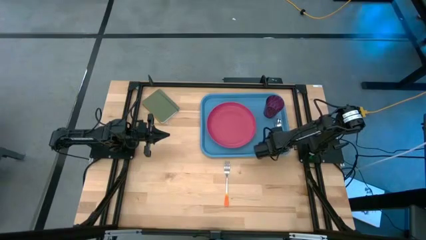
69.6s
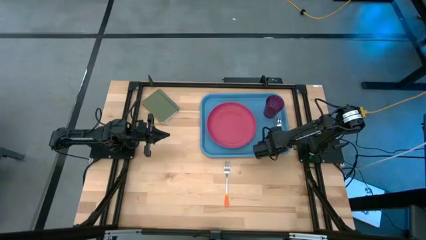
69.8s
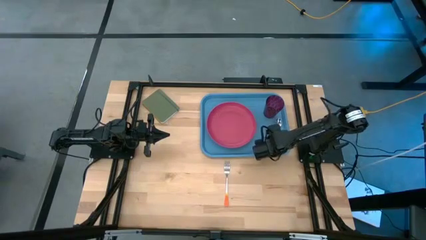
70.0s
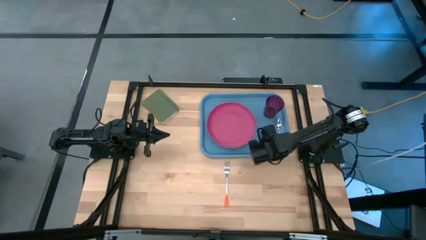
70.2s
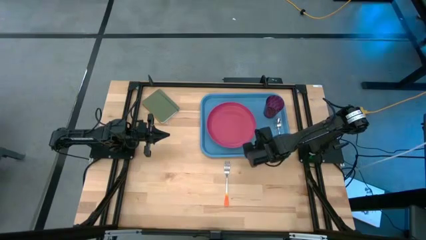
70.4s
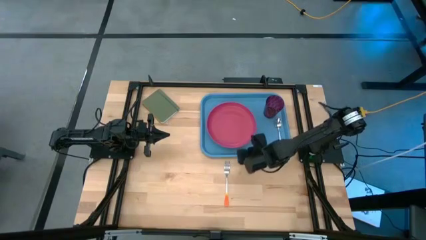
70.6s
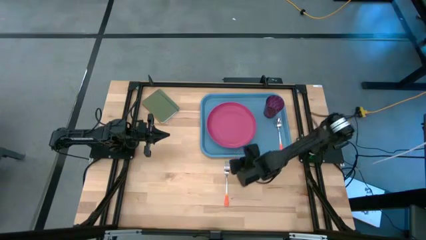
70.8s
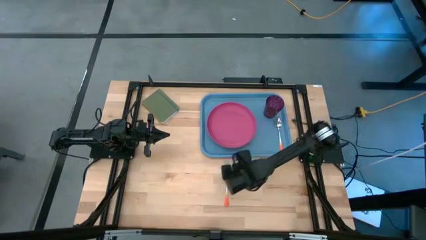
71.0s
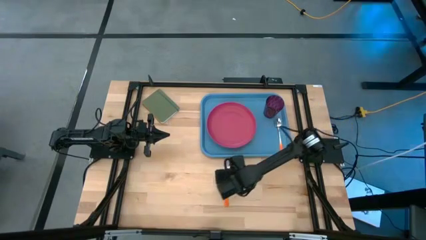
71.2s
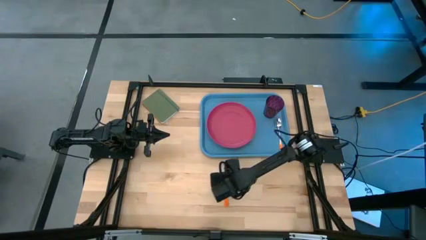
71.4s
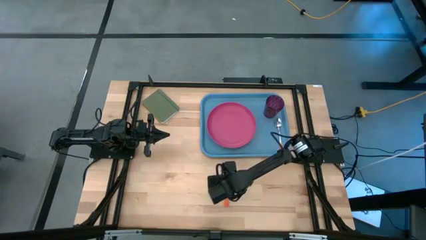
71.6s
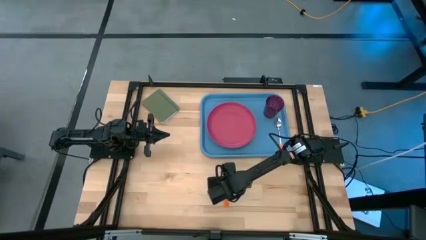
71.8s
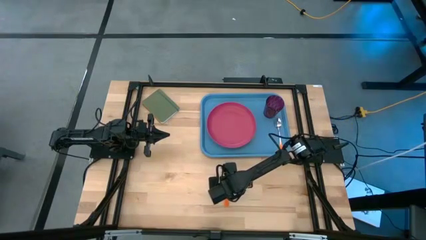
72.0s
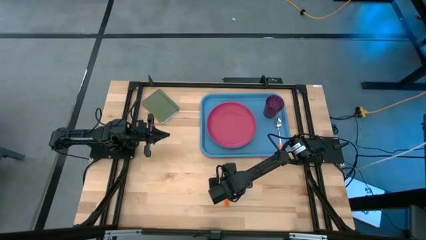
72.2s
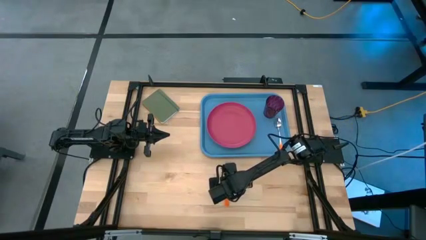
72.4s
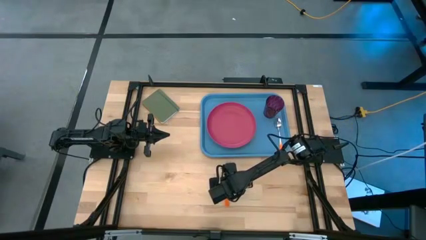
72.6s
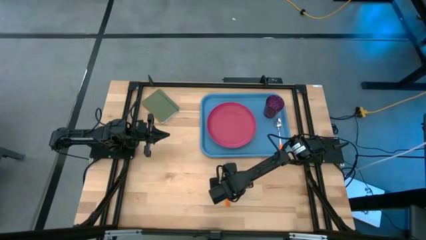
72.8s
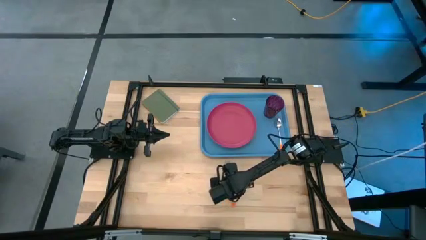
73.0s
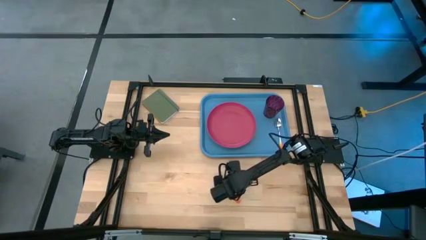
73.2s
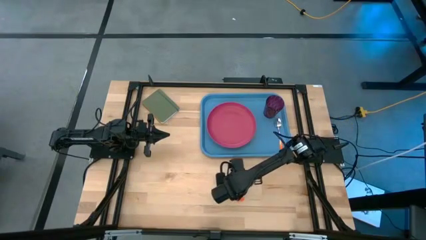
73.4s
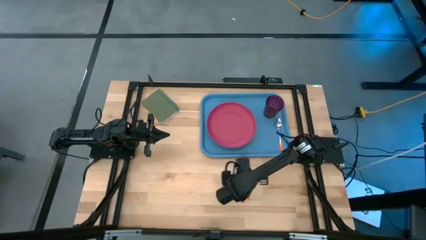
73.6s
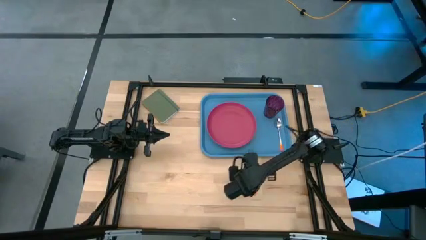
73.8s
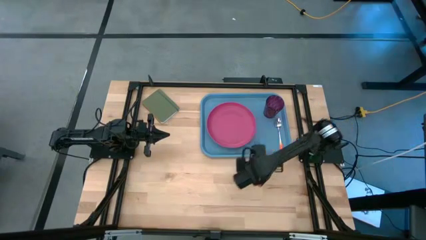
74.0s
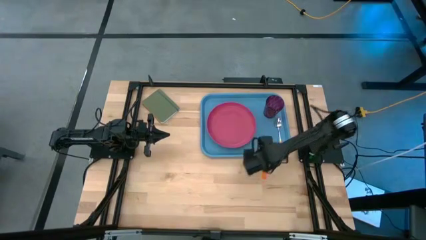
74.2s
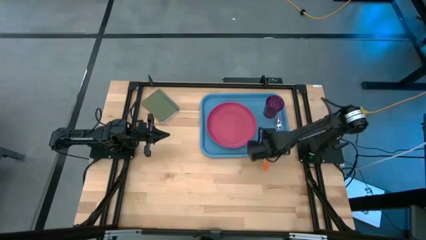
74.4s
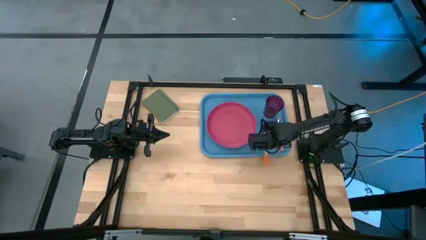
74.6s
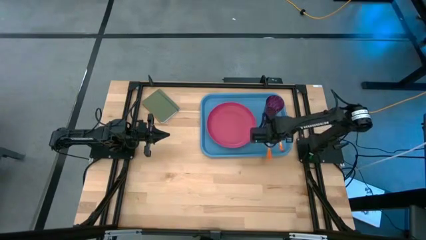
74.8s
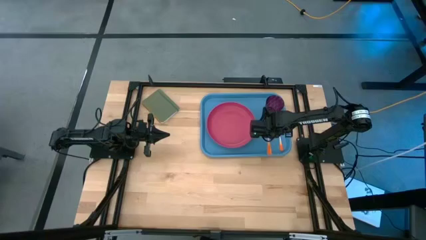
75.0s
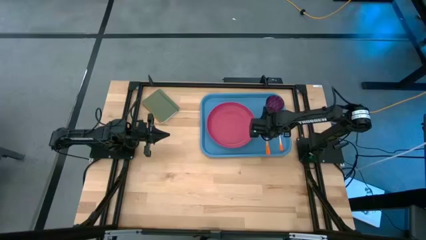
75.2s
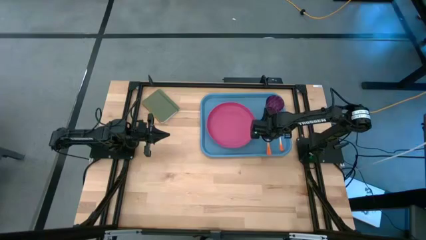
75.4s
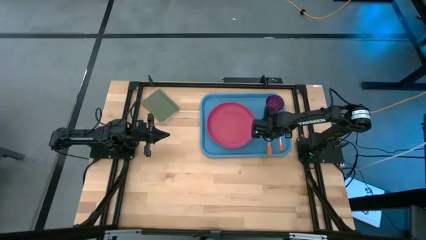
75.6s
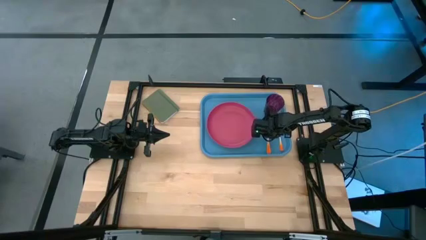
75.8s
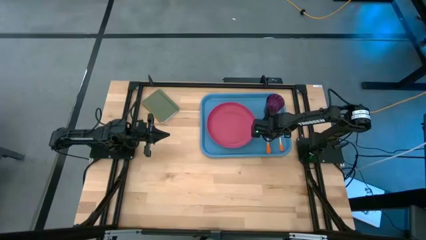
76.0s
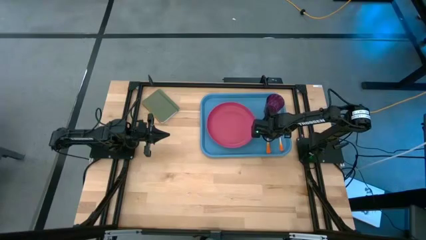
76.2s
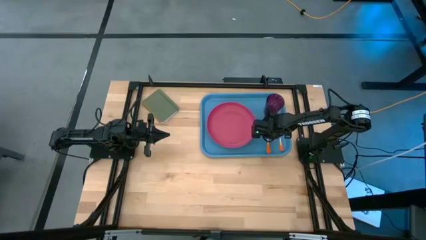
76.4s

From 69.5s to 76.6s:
Task: Pick and place plate/cup/fork/spoon on tray
Put the orange fork to the right of the pink plate on the blue tray

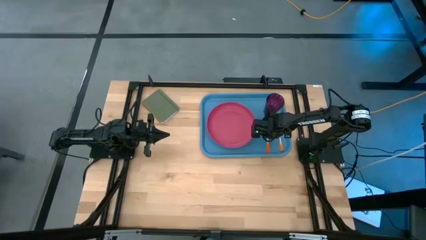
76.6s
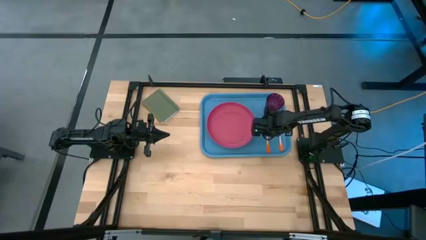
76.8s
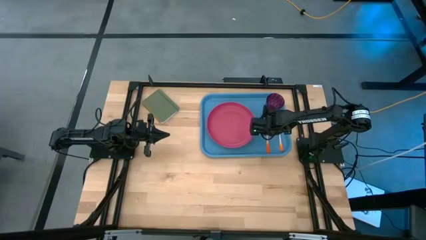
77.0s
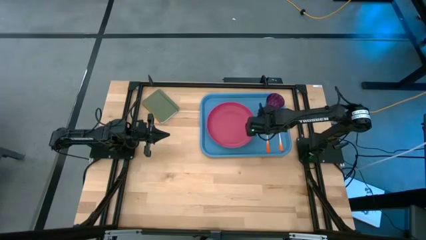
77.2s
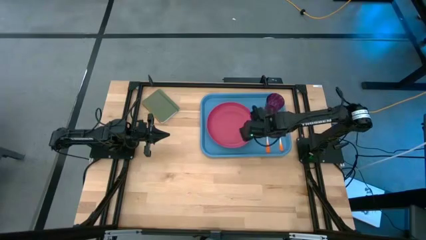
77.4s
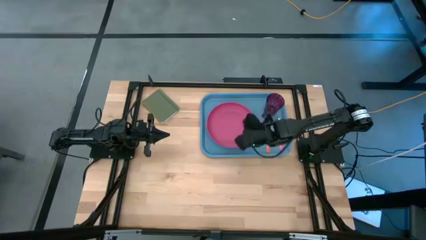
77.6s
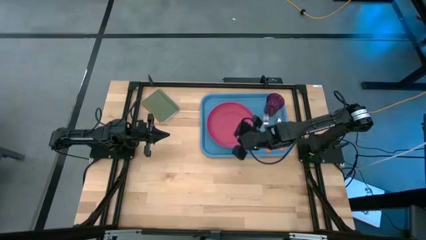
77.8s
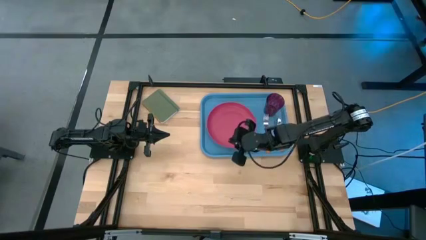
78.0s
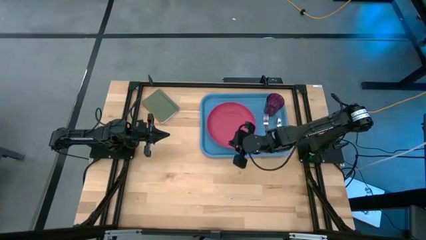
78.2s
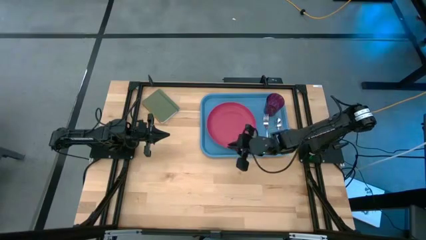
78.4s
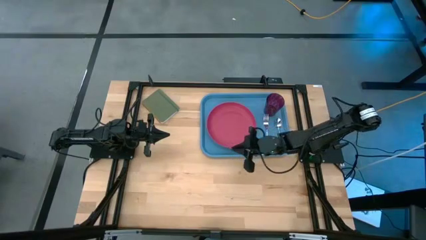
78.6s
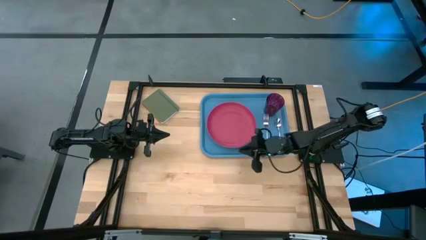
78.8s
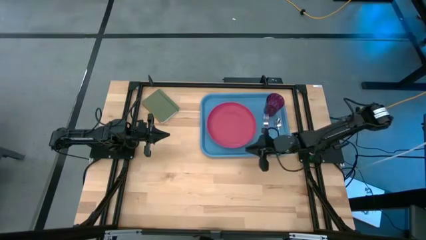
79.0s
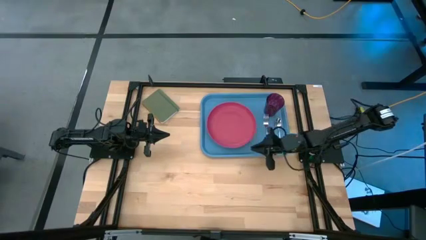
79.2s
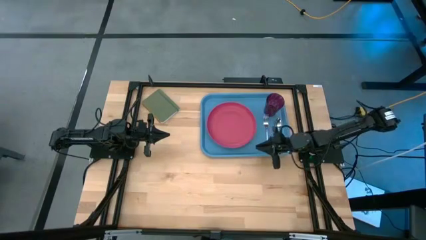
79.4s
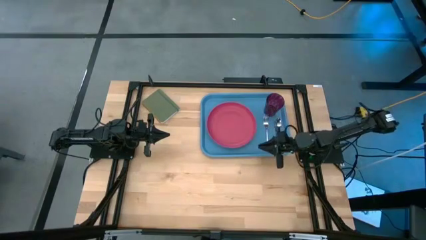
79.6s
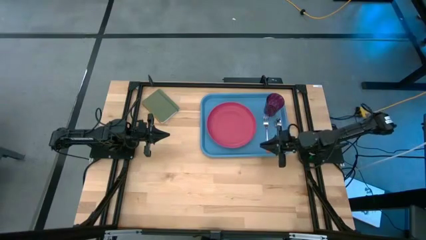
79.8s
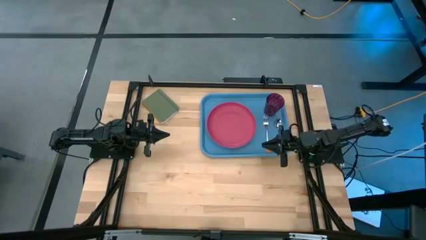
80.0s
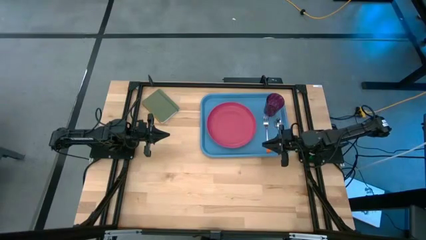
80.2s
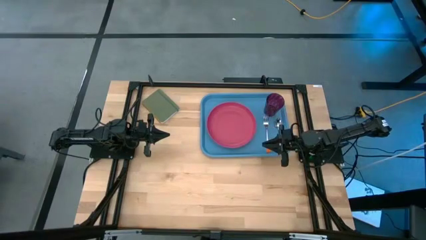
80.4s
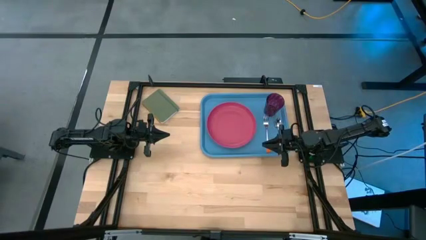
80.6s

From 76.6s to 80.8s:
Return to Home Position

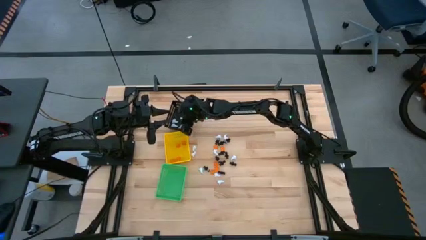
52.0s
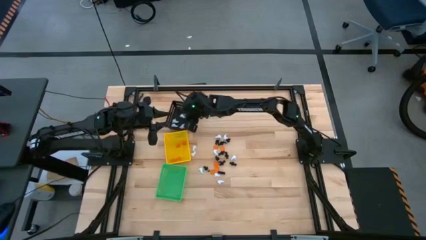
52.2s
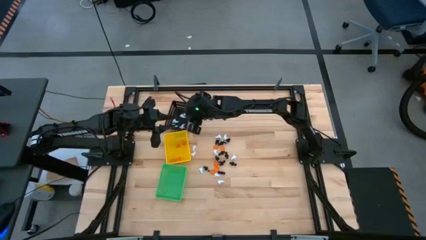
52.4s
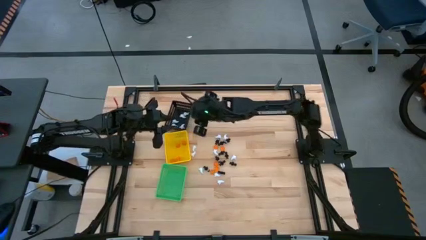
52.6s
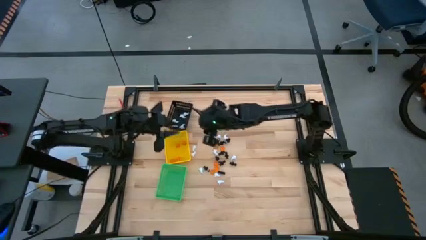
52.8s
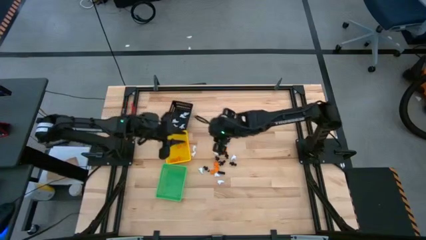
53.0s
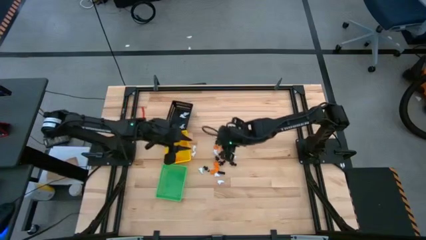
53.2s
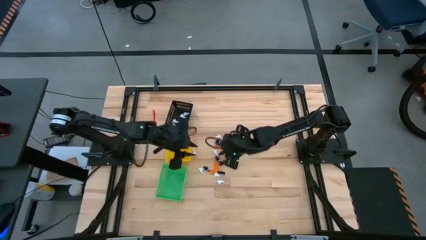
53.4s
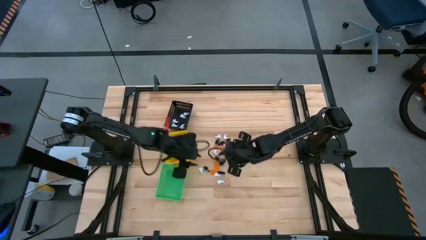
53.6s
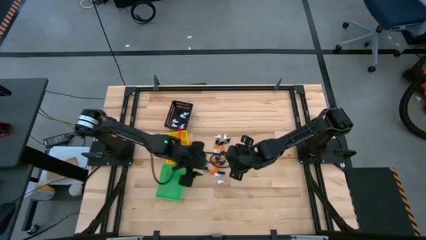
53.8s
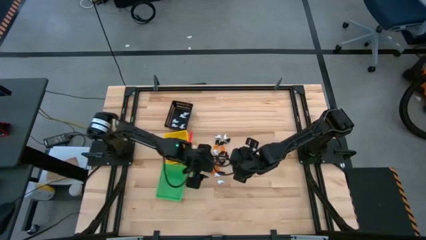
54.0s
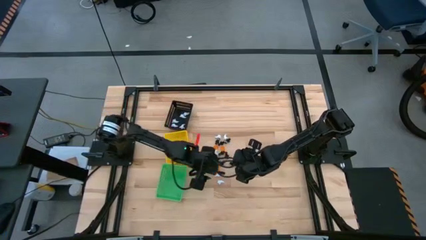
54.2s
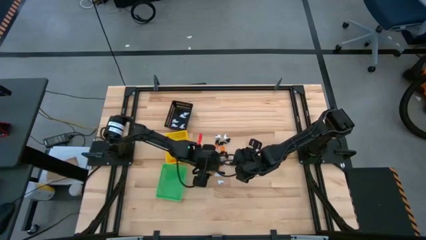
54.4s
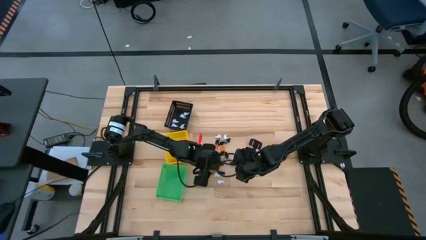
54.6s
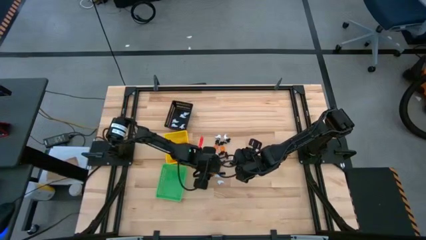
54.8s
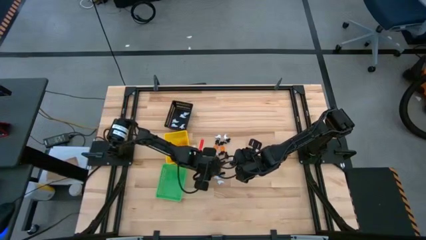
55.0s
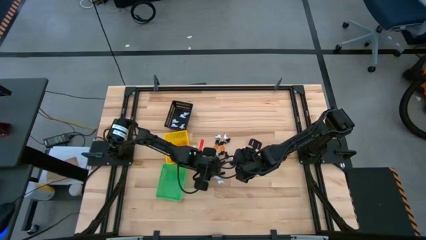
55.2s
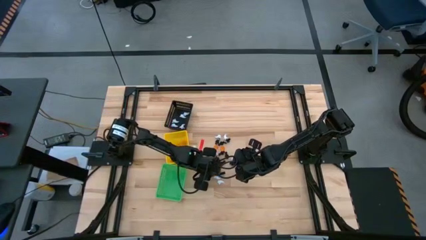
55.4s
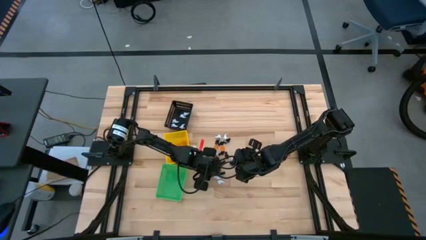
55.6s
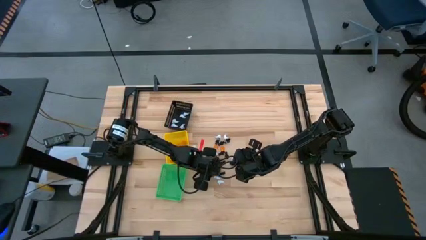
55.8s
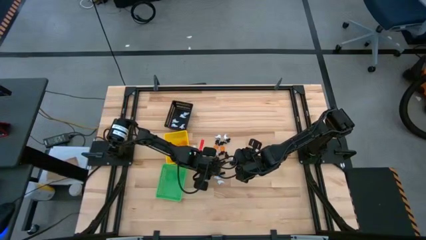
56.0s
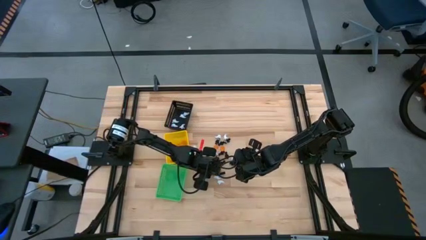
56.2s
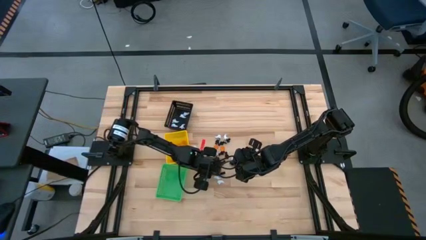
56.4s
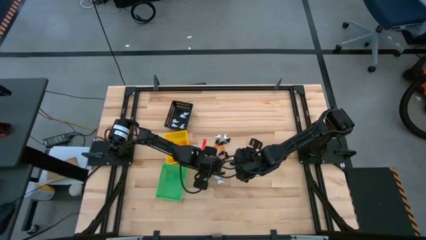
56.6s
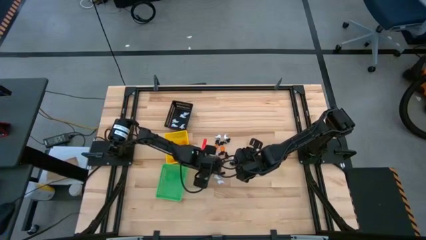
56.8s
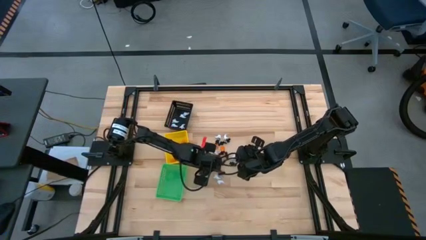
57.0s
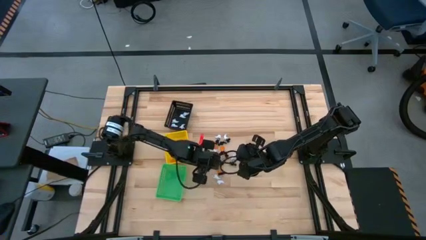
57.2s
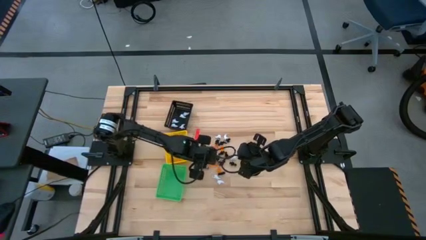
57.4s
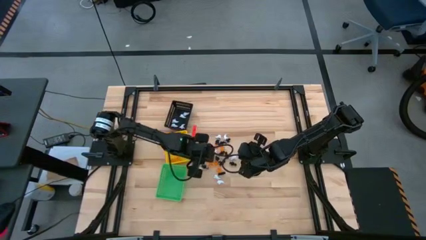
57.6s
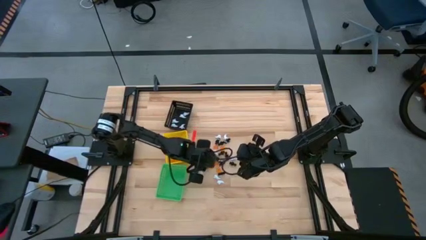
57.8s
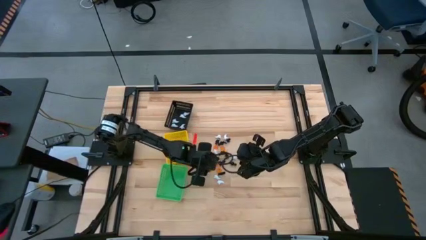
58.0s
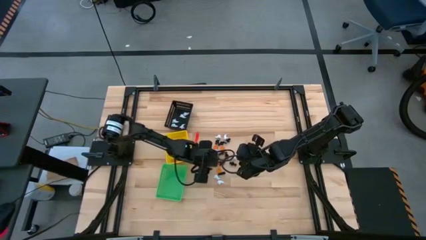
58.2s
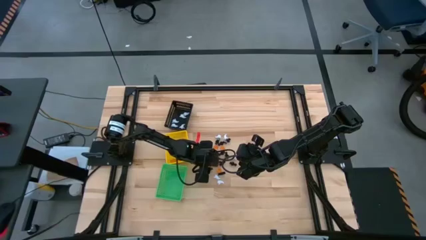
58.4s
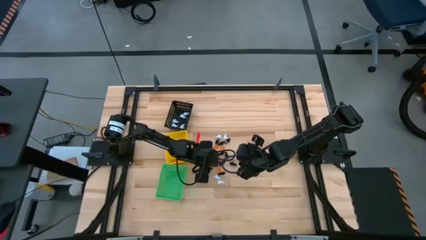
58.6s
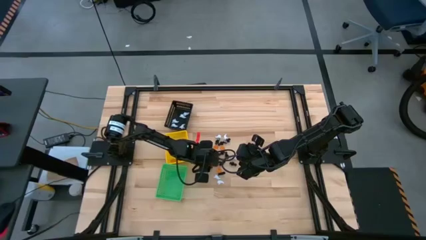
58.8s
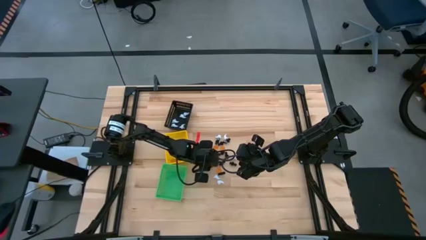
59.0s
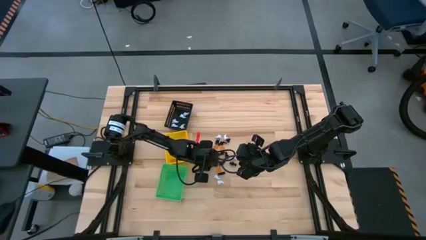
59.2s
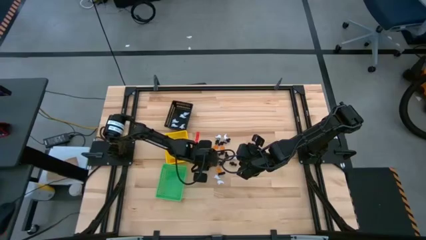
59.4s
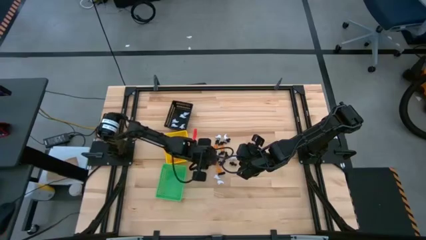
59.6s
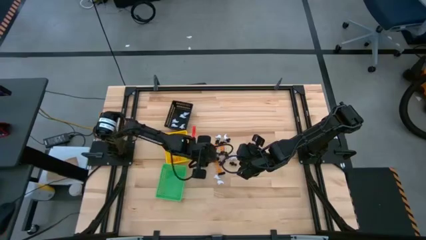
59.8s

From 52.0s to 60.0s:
Task: Sort Halloween decoration
Put the orange pumpkin toy into the yellow basket
